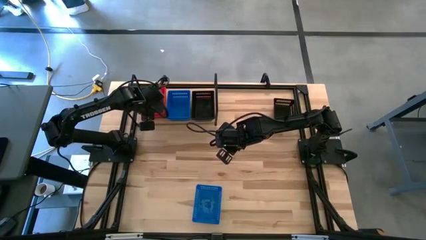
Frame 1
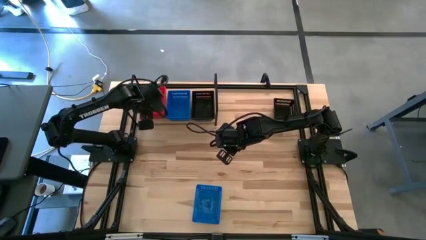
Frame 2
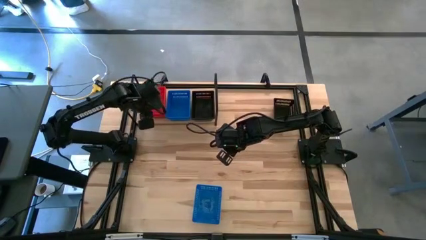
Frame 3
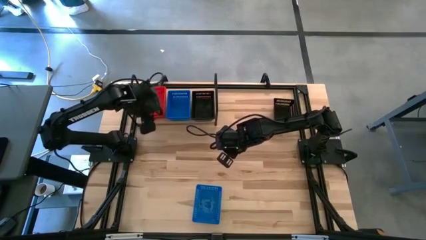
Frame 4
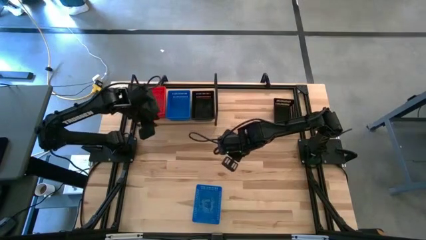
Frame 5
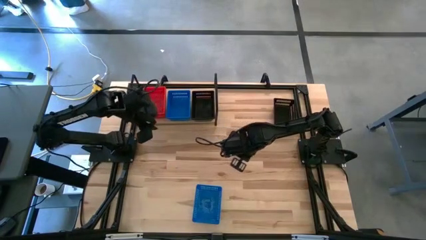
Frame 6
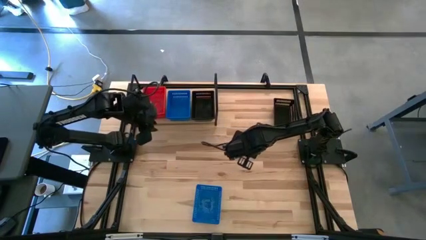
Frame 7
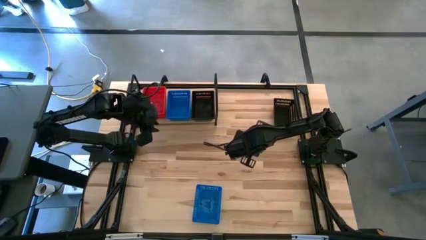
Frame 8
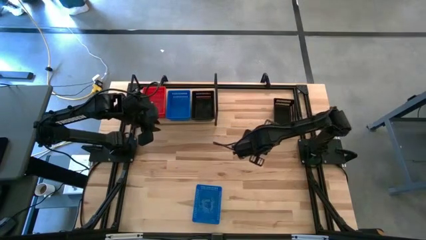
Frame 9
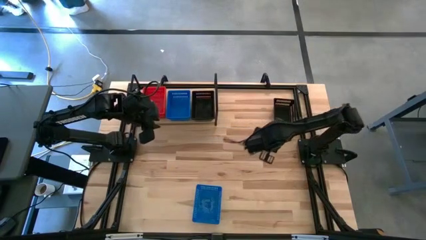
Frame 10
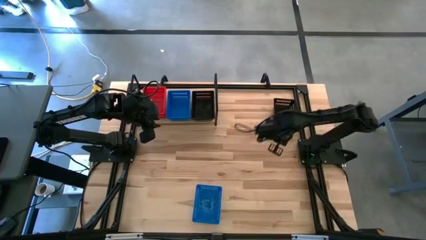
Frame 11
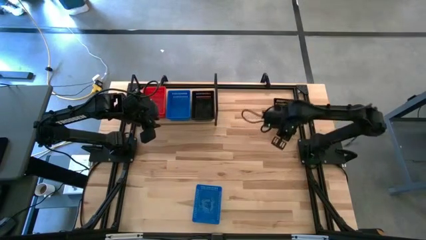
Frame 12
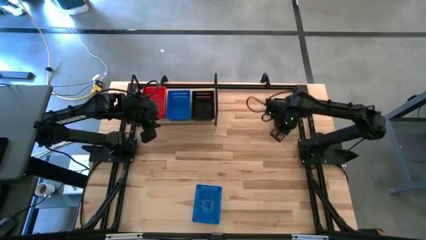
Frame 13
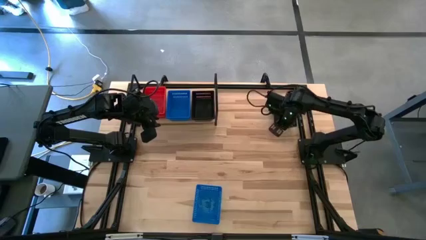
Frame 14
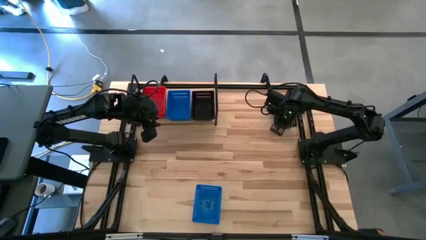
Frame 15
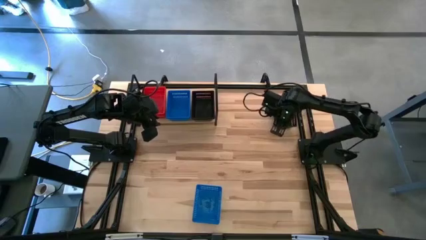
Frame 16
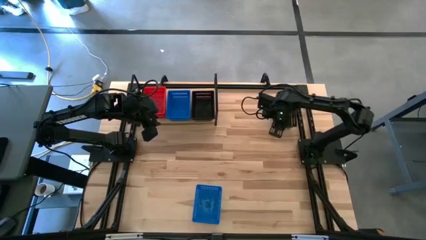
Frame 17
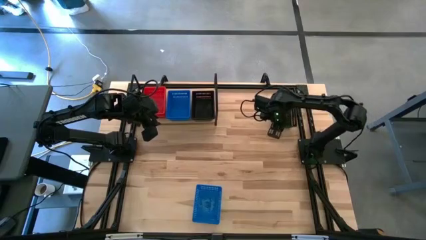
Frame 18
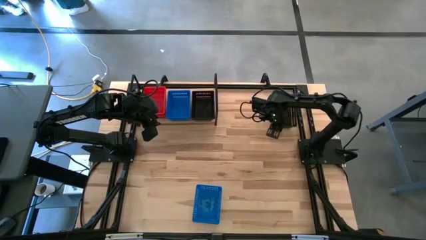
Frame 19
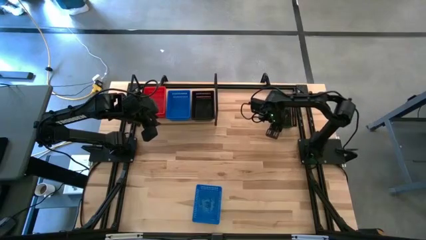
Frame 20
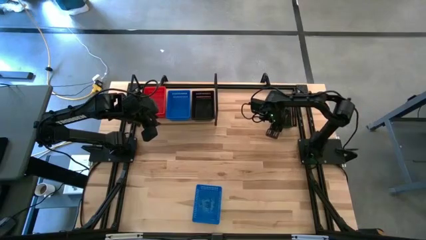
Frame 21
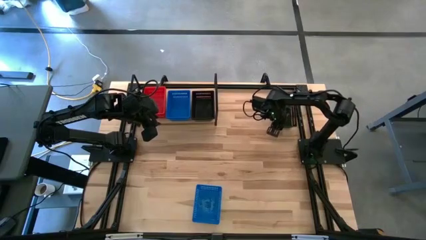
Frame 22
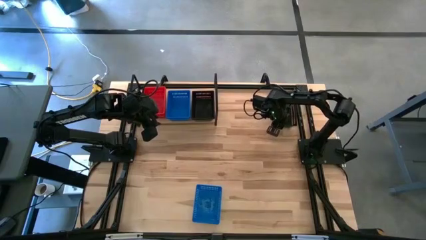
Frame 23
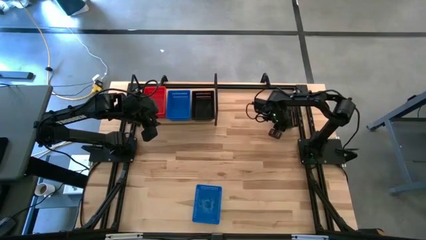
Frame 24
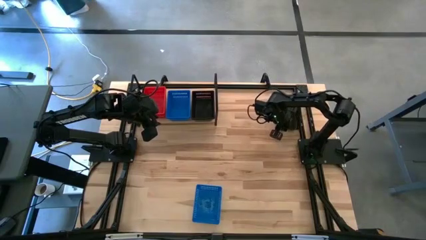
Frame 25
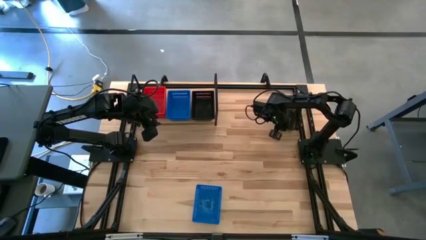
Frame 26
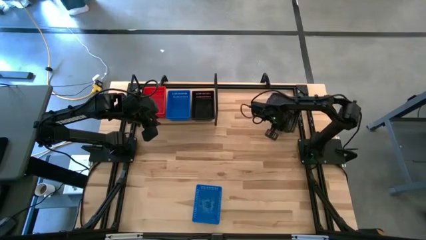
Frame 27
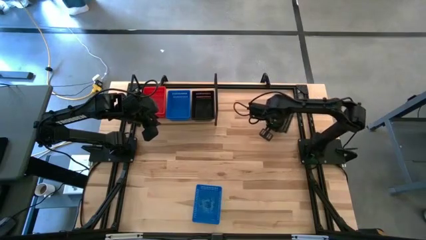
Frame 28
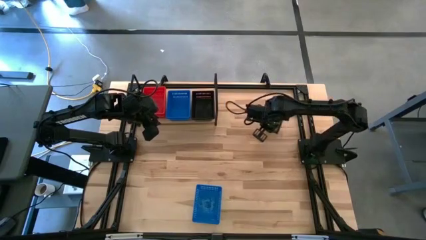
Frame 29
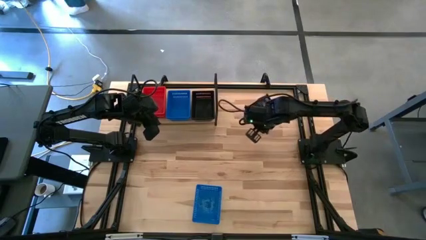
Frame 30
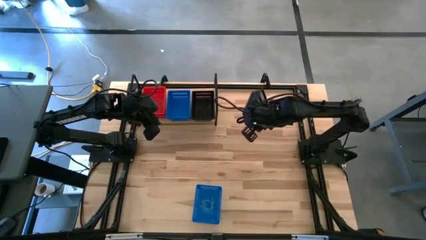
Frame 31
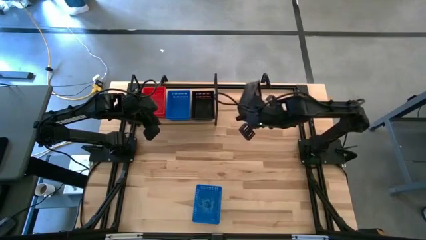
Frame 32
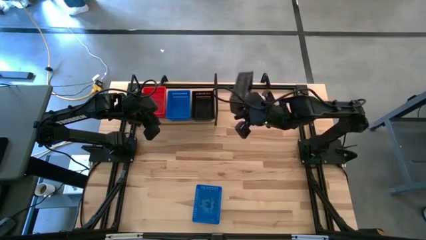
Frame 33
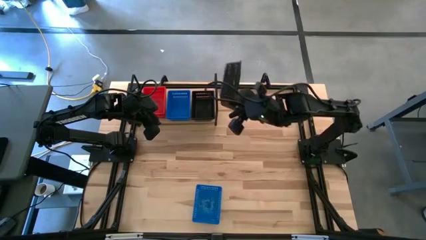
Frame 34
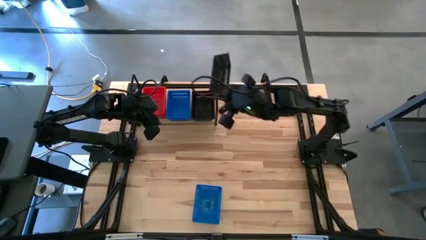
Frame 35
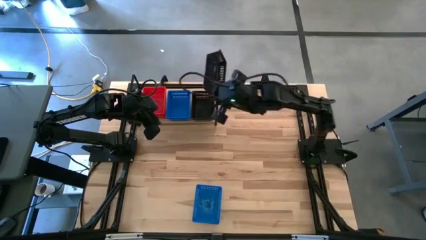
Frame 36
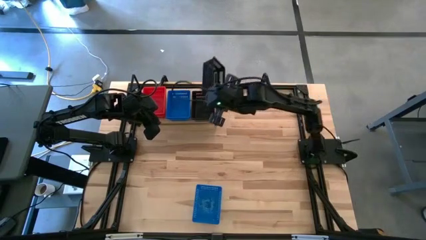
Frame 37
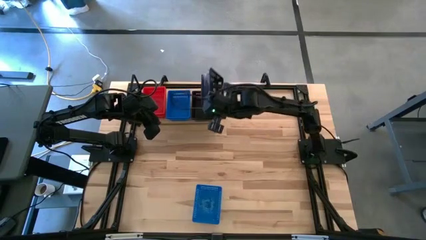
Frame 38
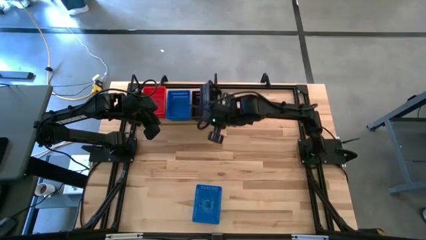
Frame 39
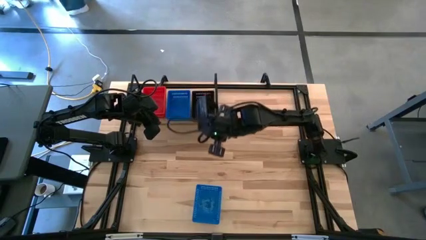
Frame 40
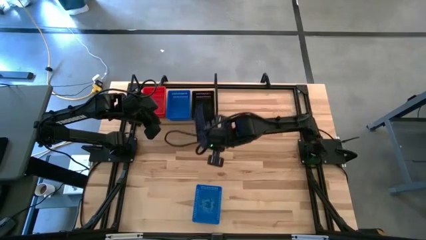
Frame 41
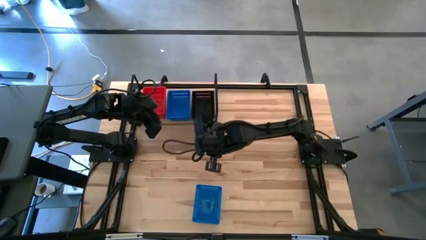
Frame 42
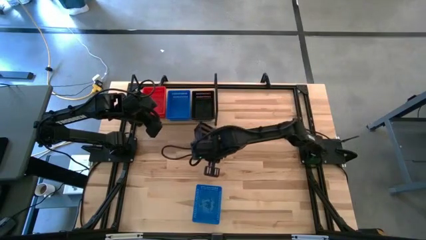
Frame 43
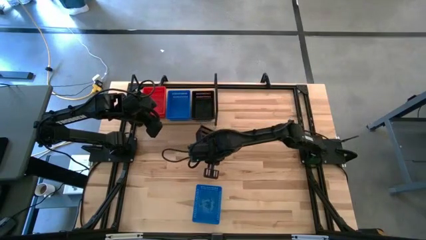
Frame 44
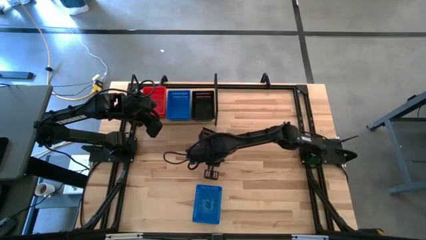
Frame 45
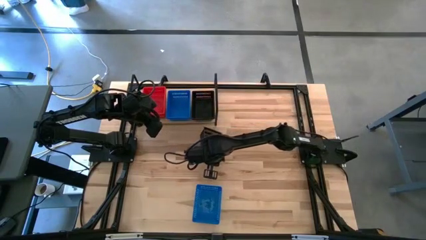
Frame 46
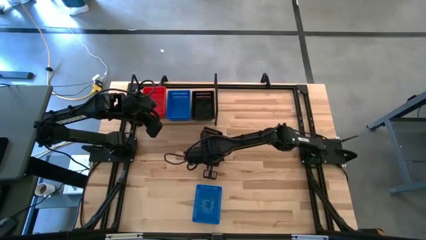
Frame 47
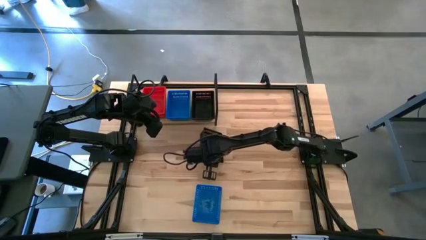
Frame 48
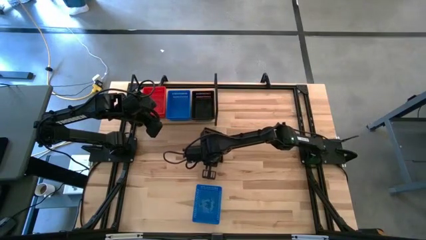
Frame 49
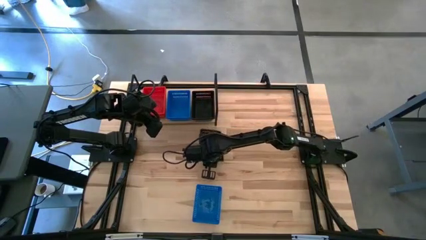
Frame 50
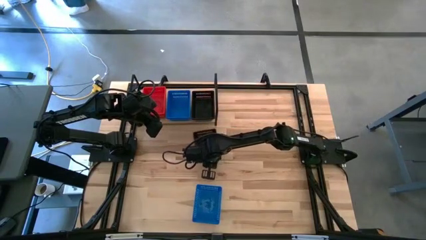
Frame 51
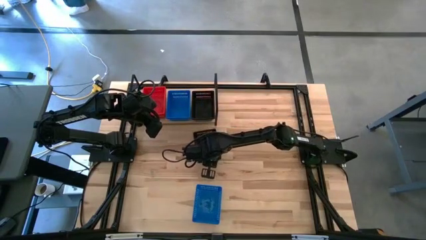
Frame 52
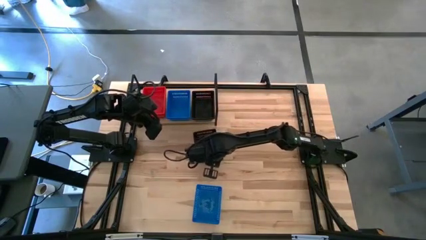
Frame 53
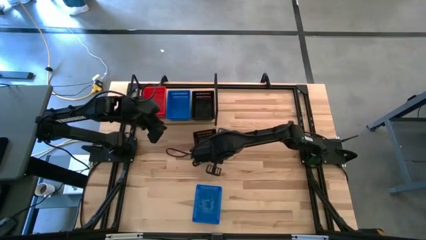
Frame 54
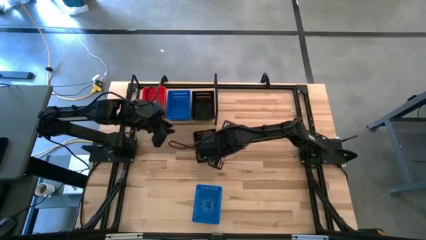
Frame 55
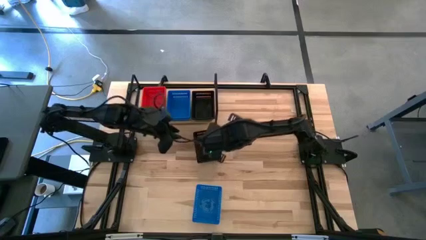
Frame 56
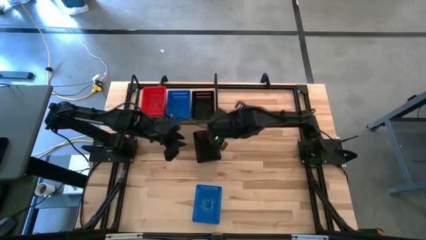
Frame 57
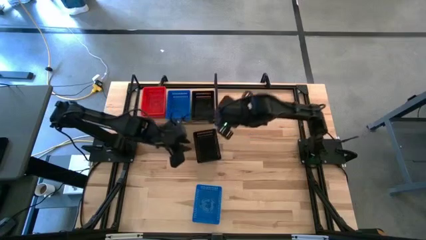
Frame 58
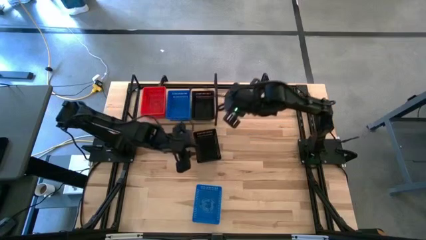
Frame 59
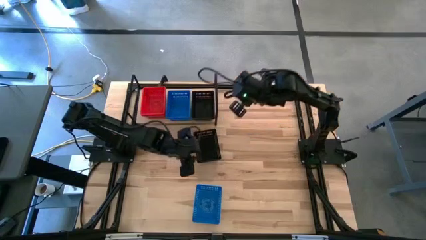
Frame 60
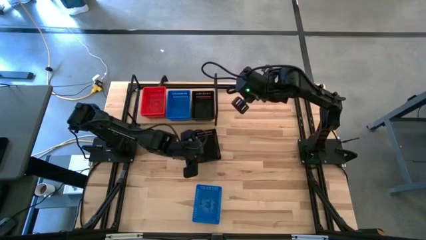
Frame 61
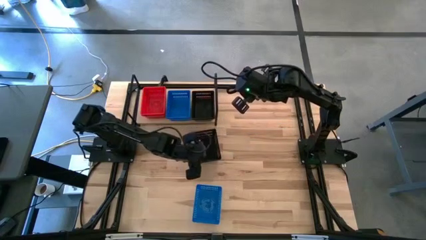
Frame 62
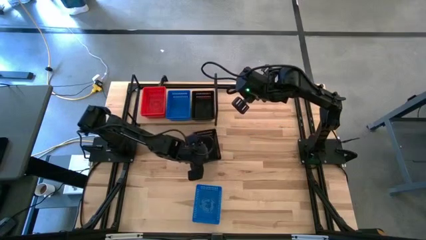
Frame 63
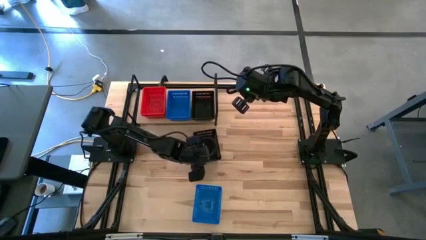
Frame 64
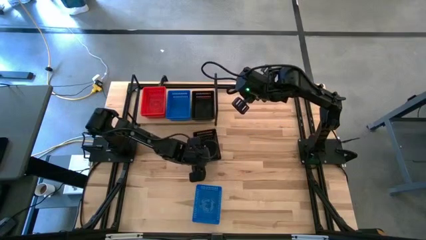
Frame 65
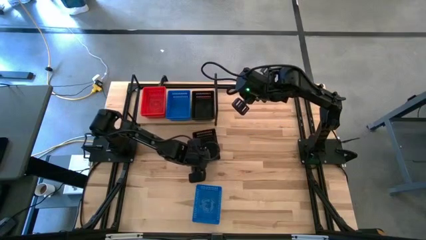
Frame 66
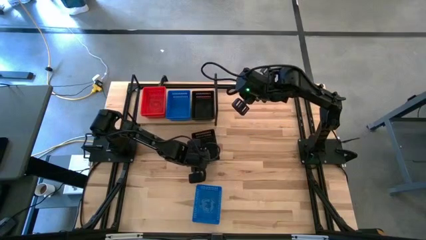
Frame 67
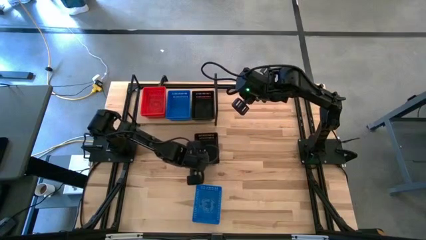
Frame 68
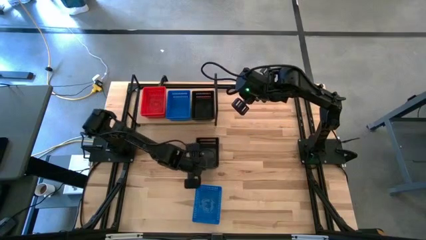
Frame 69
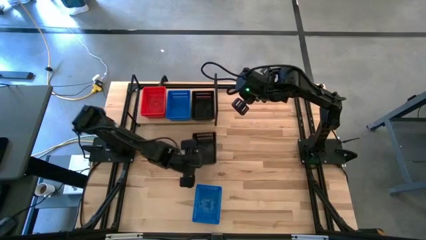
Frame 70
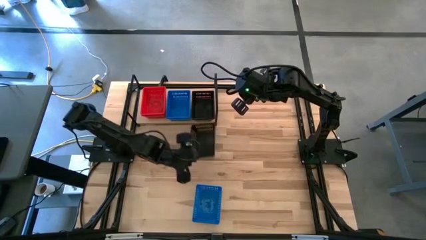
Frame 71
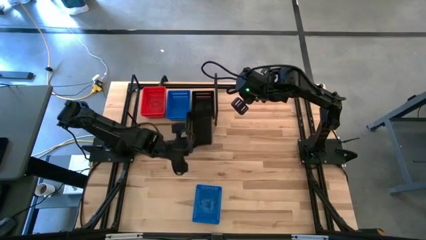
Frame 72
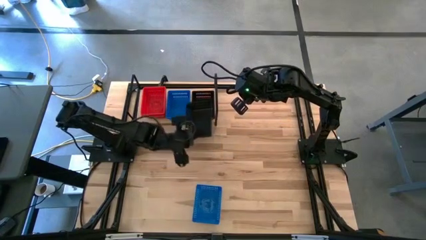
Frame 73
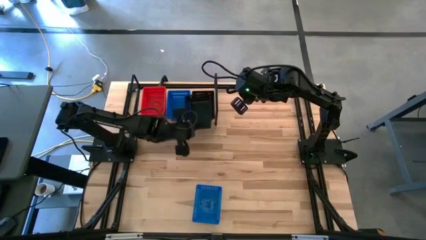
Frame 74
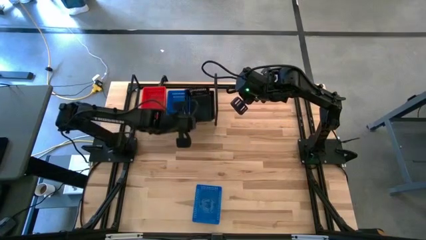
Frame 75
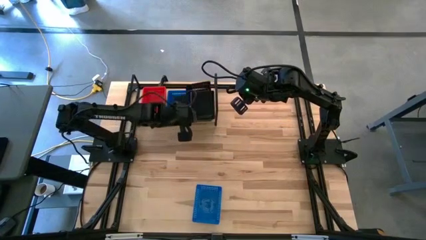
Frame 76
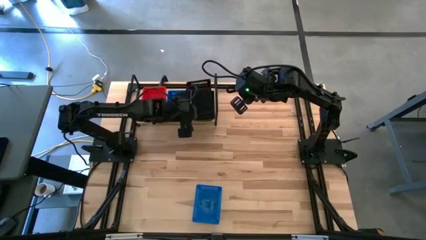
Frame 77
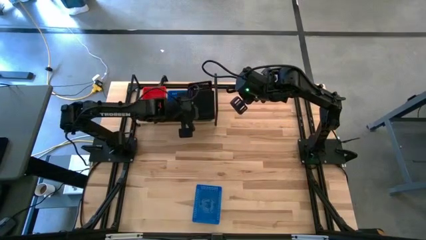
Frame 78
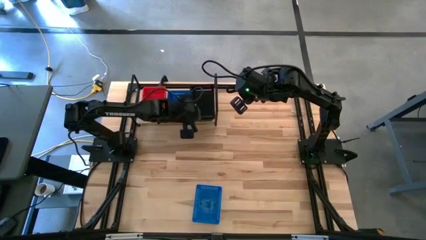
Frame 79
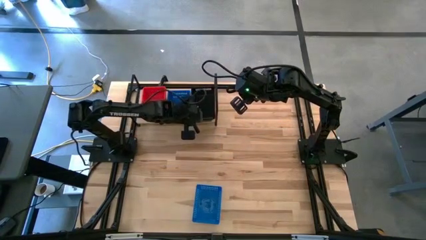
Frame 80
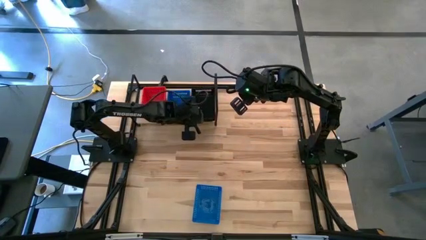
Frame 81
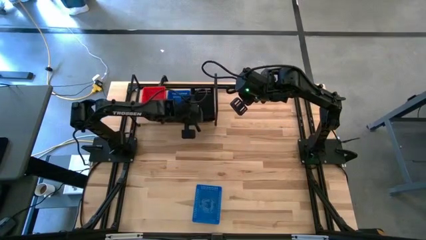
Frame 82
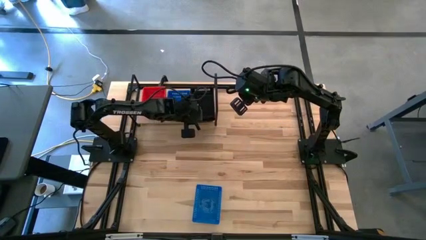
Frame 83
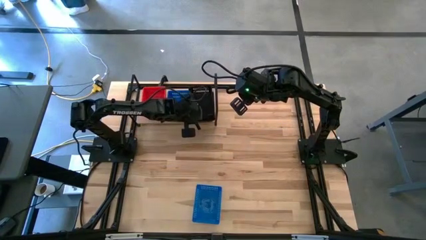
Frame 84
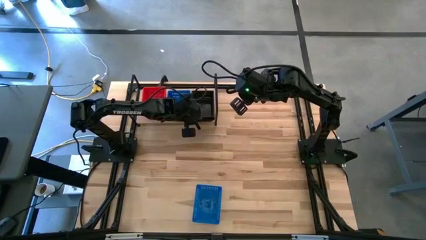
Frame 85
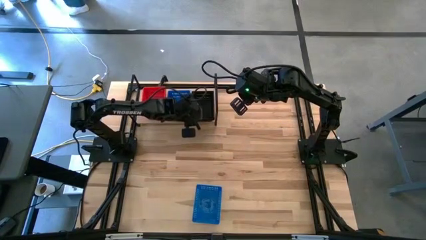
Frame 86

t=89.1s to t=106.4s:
Task: Stack baskets on shelf by color
Stack the black bin on the other black bin
